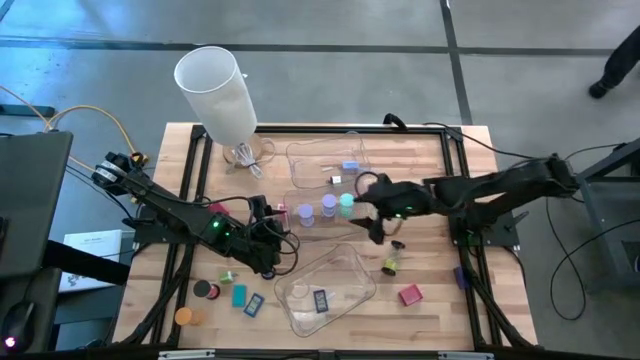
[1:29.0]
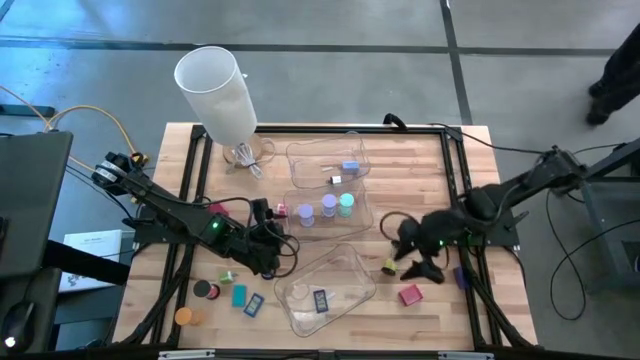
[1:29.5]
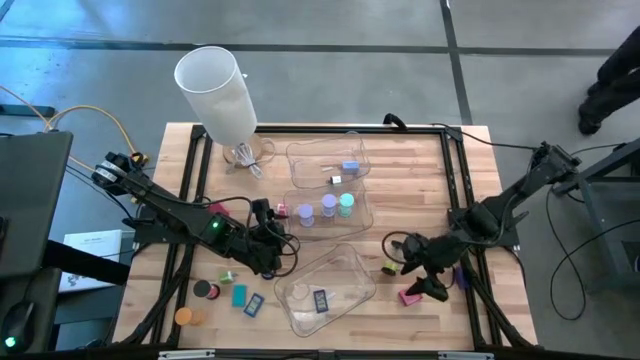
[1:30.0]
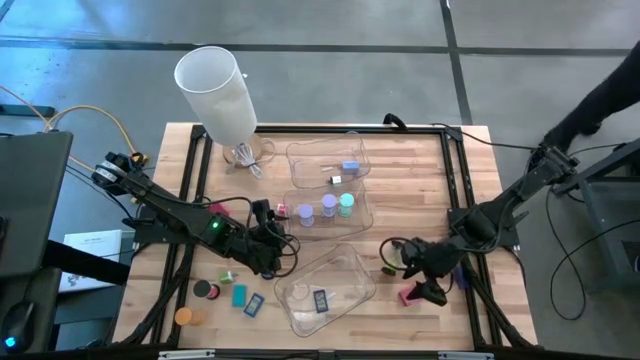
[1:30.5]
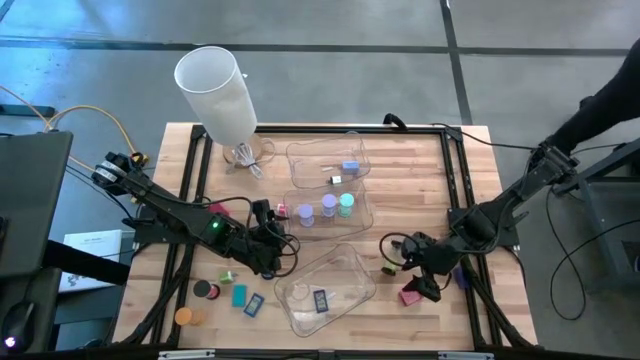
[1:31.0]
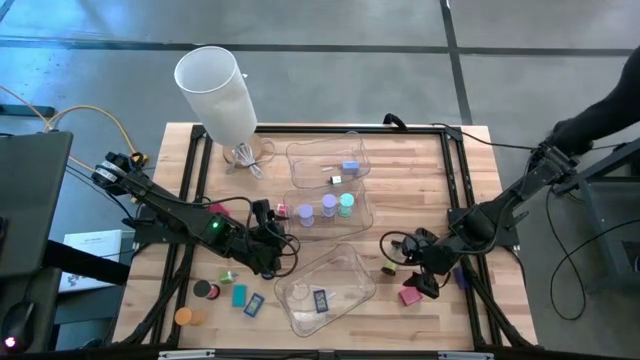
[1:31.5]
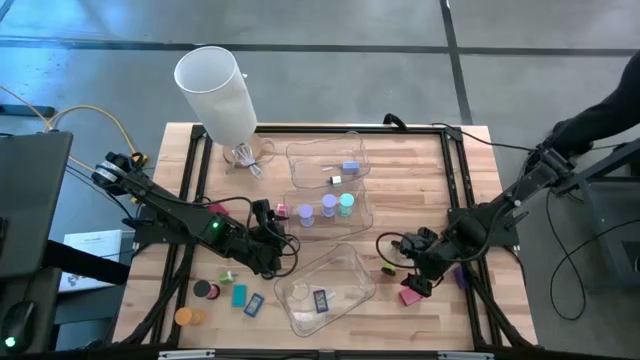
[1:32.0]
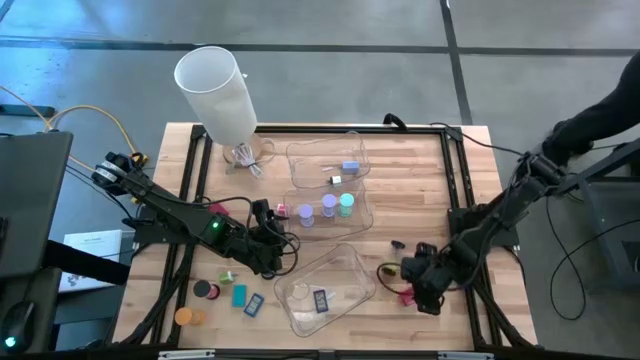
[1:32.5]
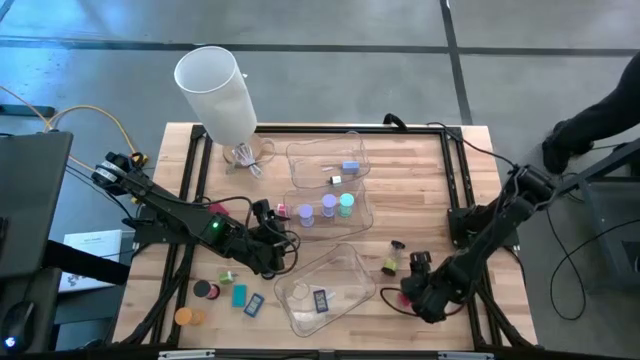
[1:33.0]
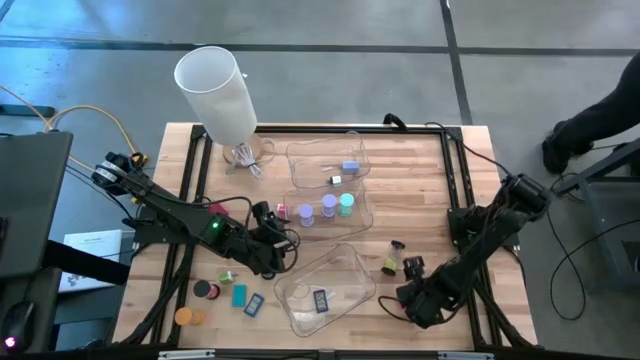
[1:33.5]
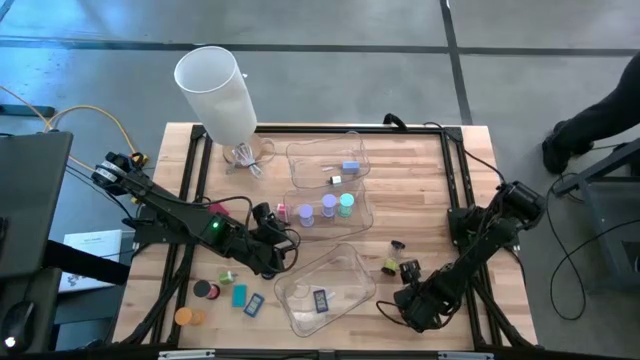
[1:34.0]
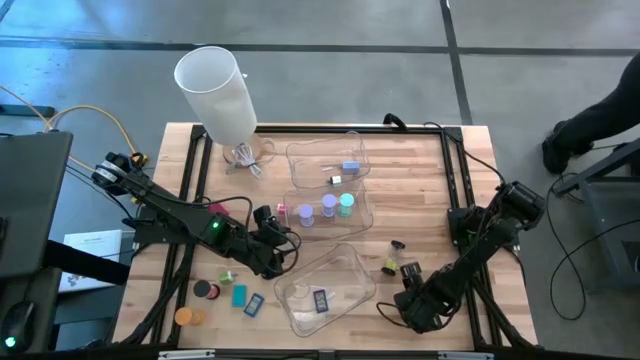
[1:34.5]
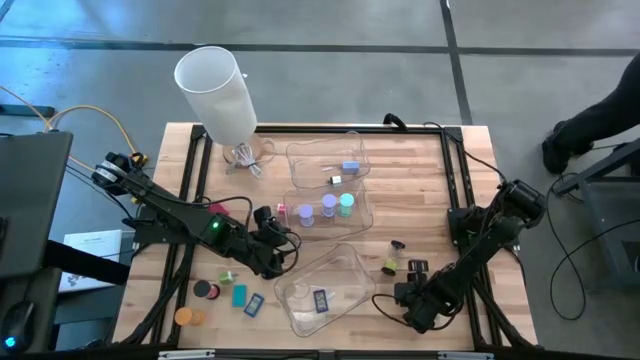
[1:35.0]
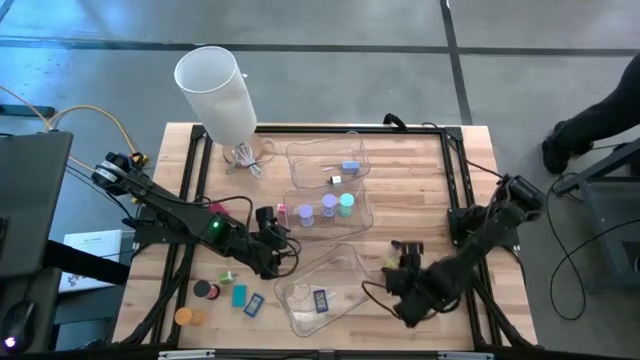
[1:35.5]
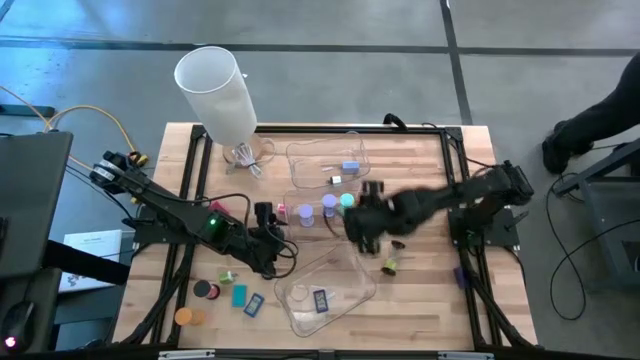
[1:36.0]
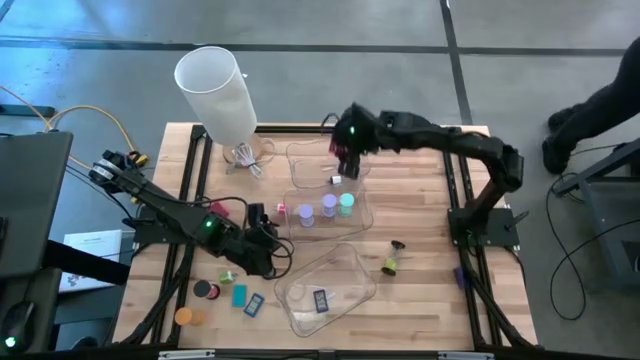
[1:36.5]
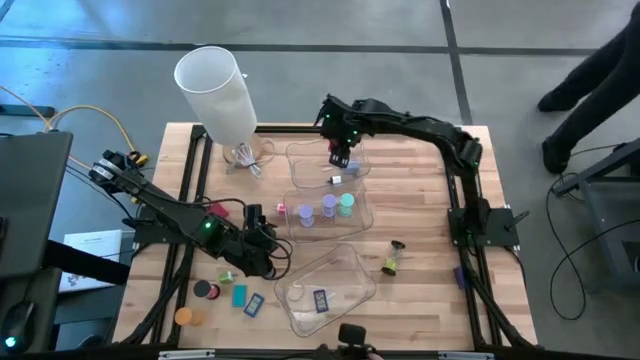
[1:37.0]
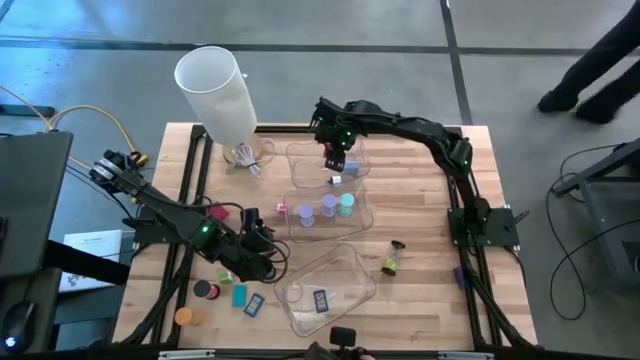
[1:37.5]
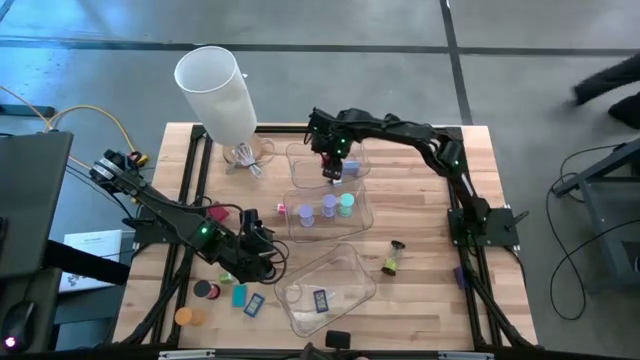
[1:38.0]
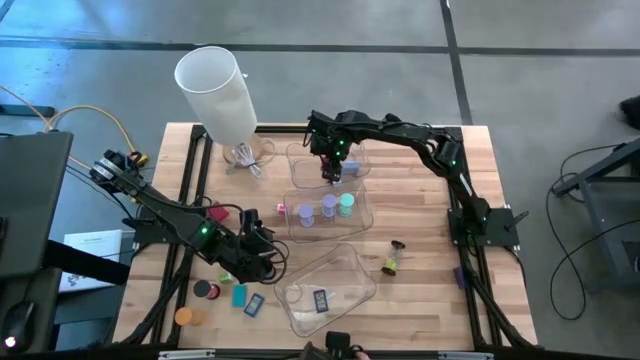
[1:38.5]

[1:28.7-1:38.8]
Task: Pick & Place Office items
Put the bottom right red charger adapter into the top transparent bin

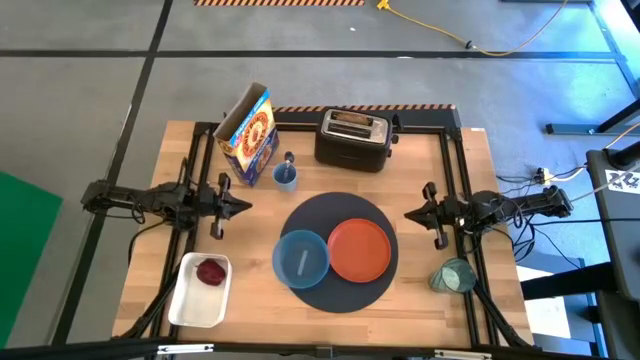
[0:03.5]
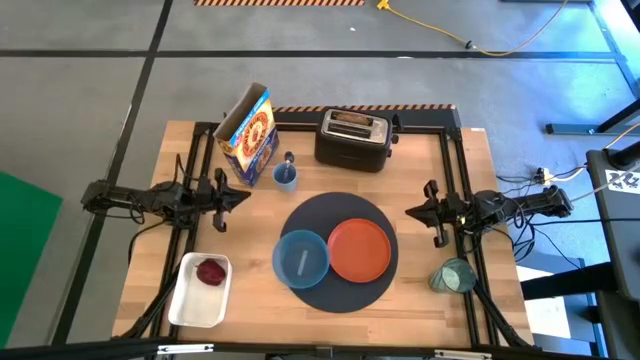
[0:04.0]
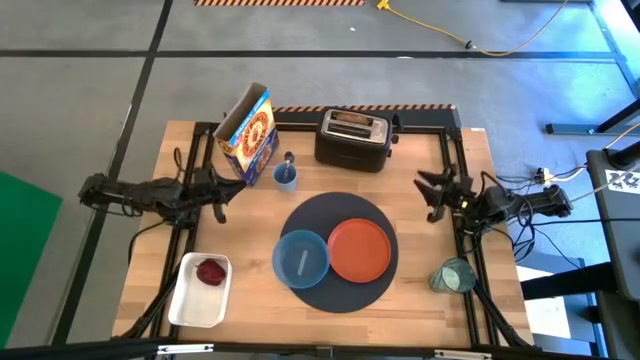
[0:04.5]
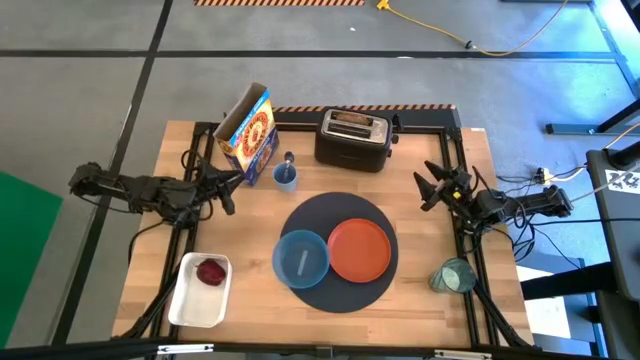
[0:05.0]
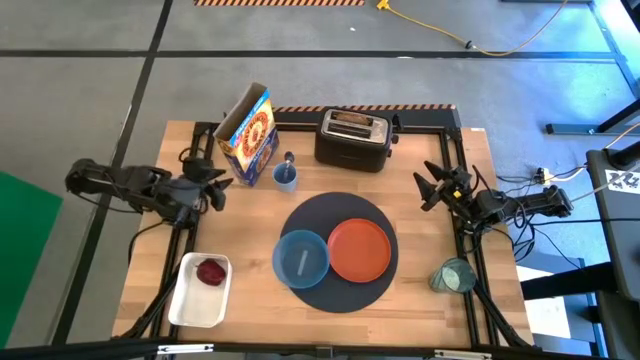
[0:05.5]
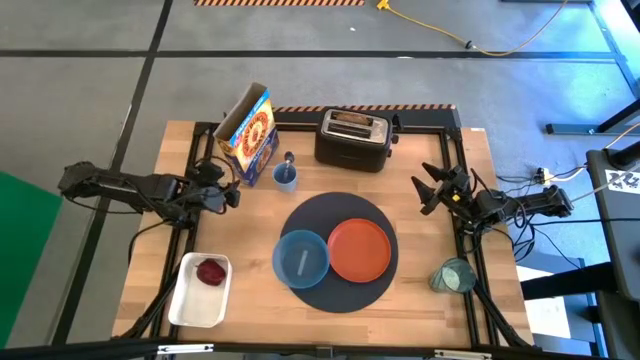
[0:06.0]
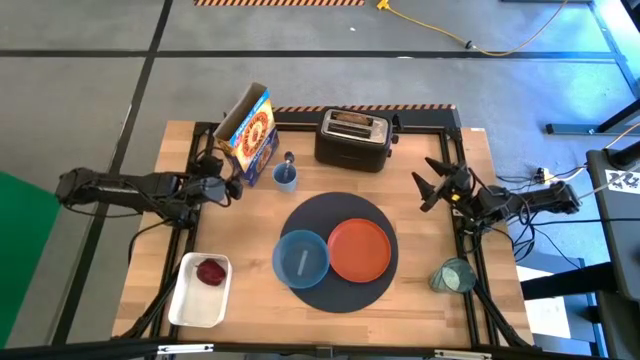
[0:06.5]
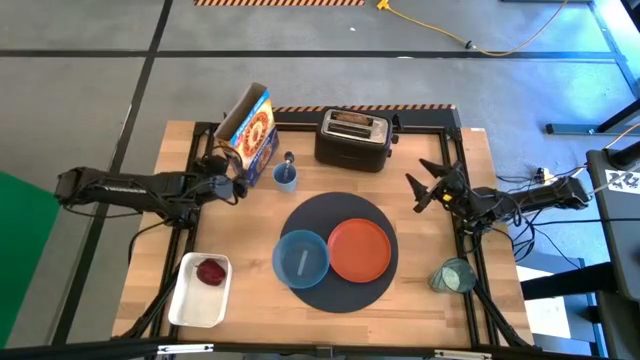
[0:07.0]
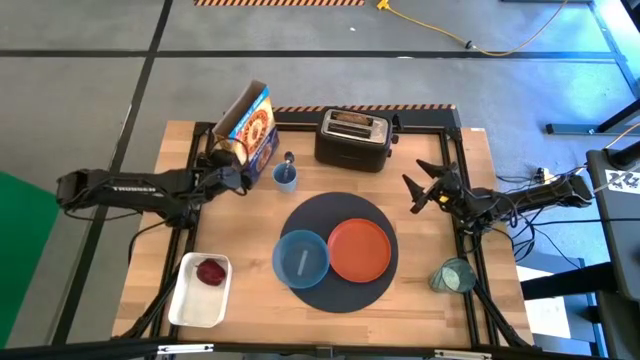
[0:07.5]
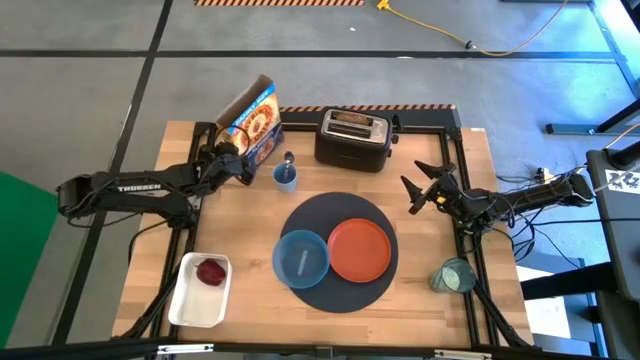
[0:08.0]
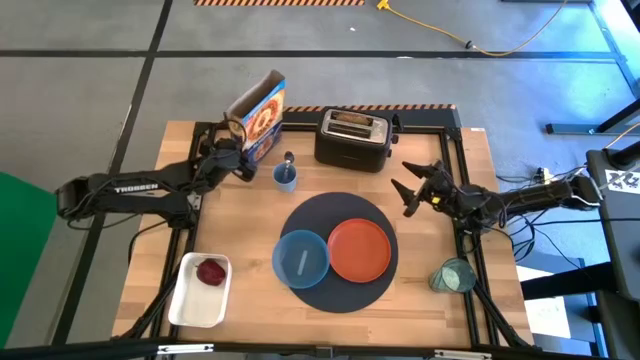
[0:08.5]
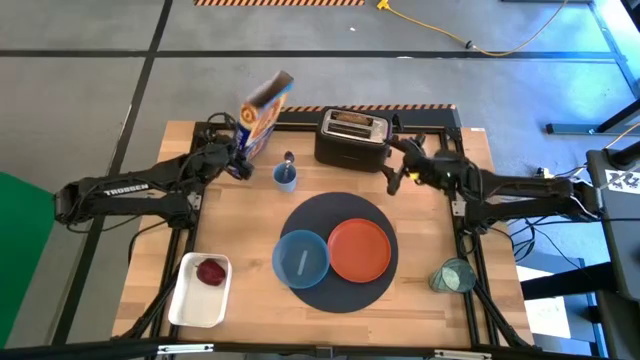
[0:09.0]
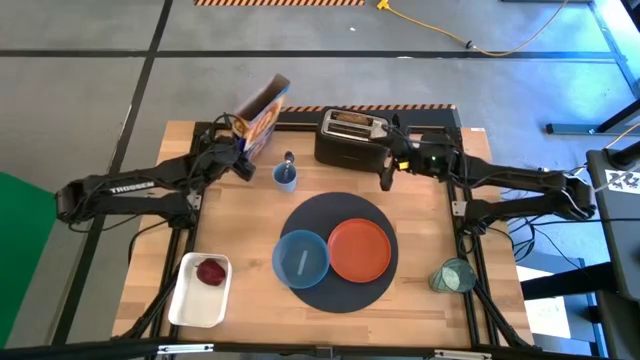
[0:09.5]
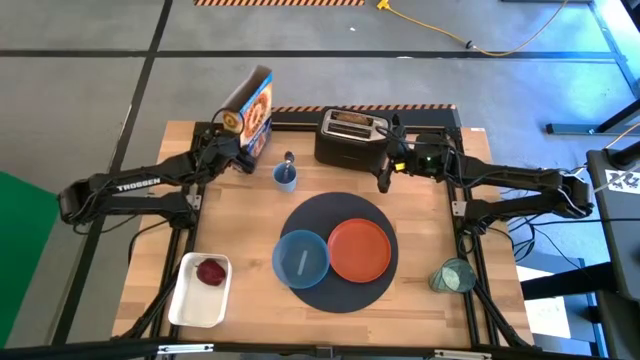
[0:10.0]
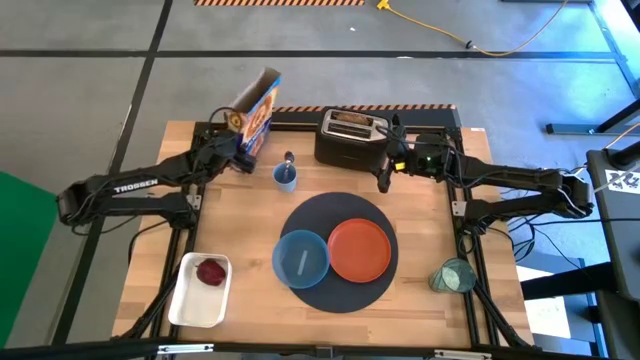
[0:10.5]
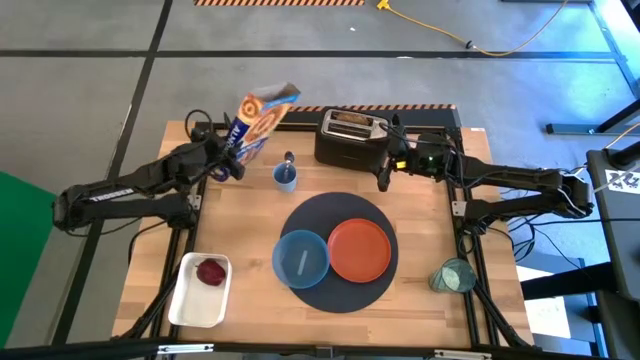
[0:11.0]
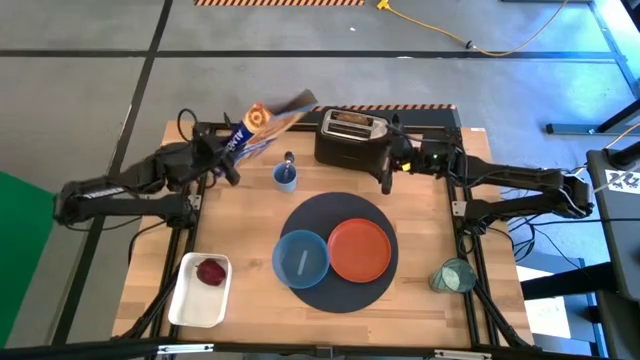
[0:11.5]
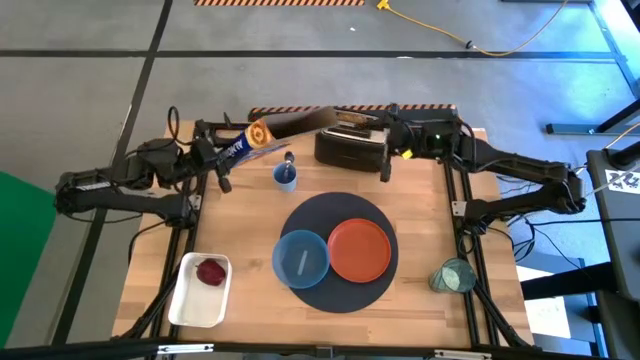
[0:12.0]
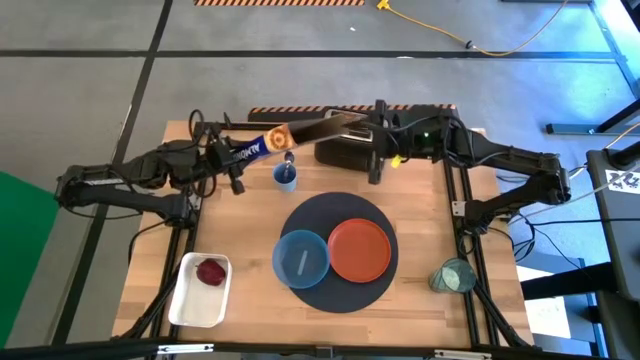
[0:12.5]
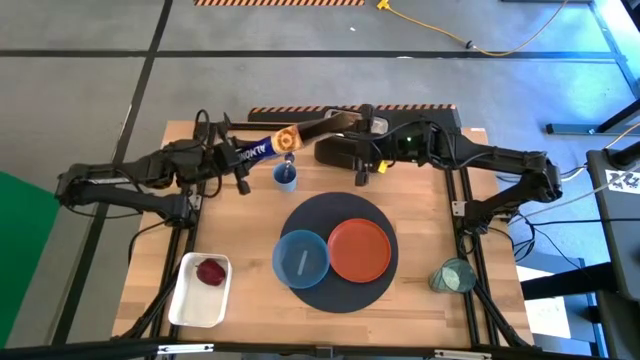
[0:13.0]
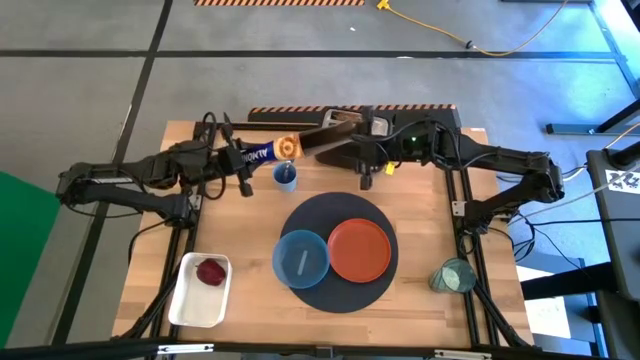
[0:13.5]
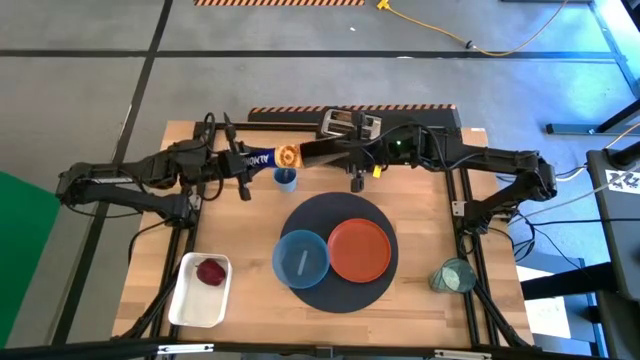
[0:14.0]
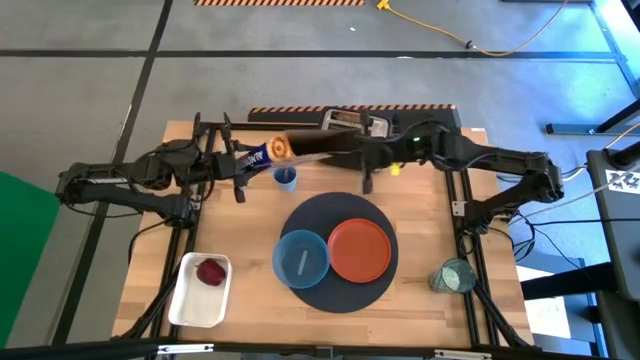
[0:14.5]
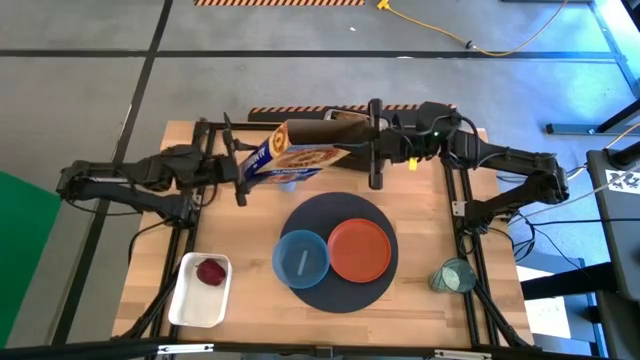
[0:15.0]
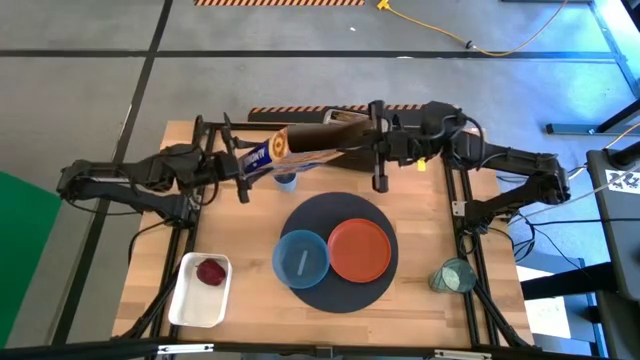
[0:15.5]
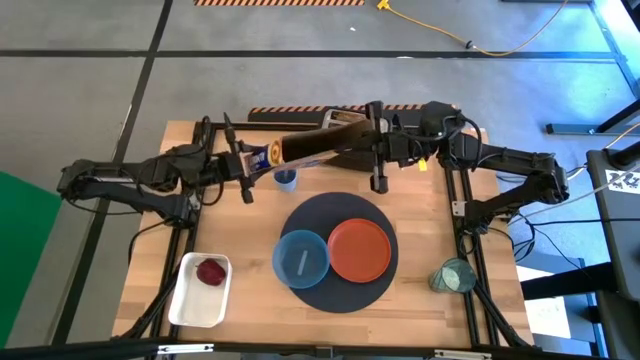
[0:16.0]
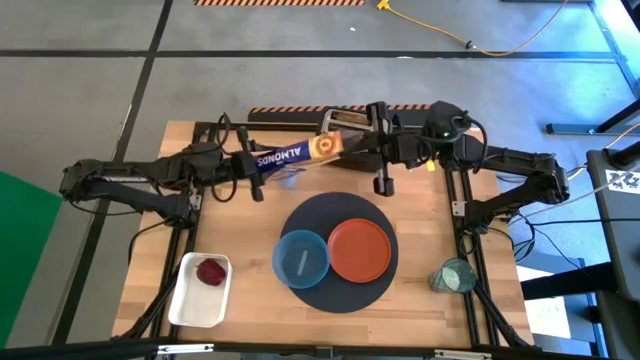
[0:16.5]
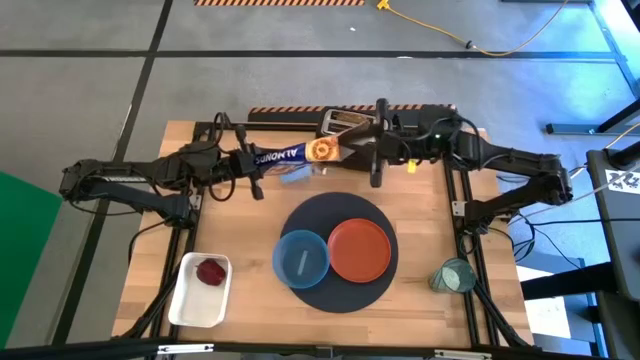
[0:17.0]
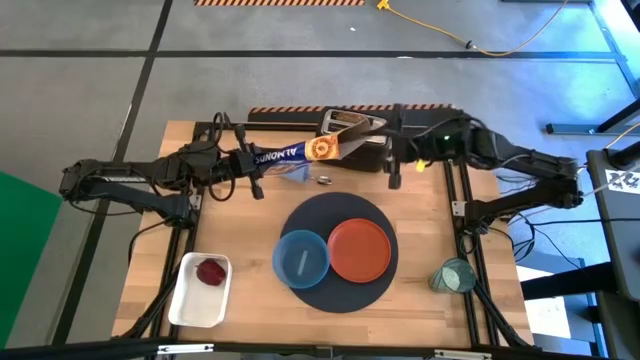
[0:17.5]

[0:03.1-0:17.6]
Task: Arrange a breakfast setting
Pour the cereal from the cereal box into the blue bowl
